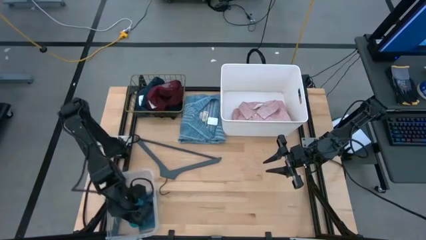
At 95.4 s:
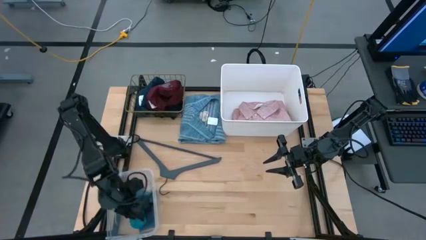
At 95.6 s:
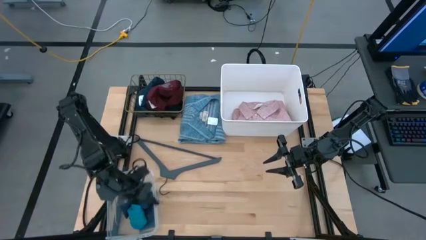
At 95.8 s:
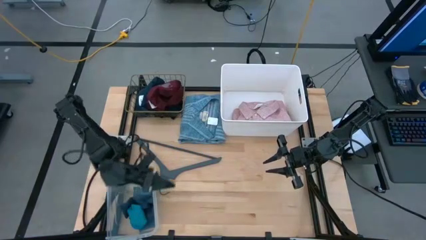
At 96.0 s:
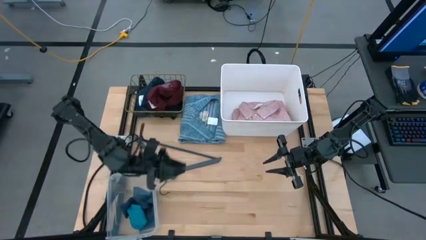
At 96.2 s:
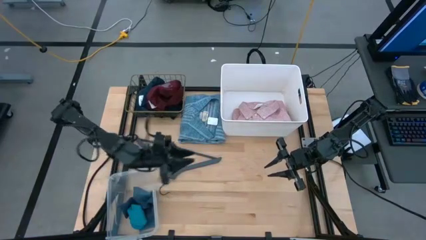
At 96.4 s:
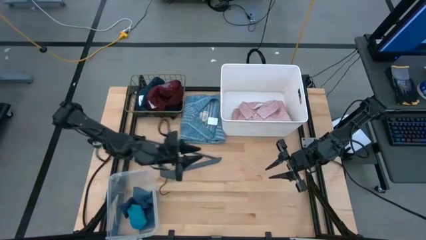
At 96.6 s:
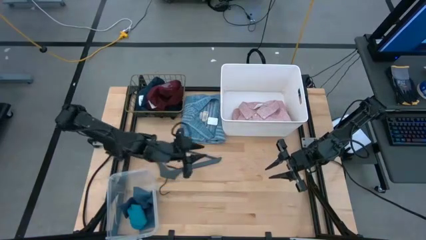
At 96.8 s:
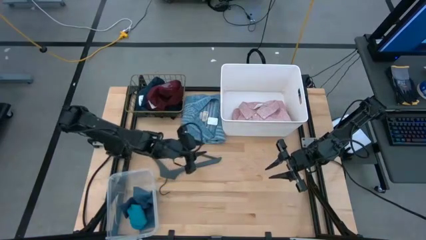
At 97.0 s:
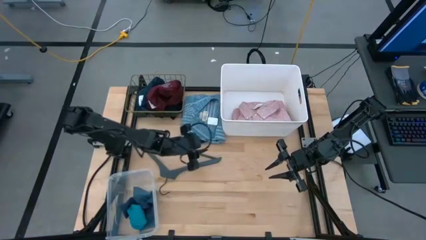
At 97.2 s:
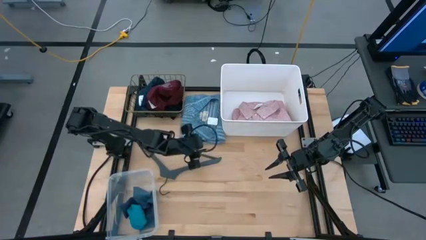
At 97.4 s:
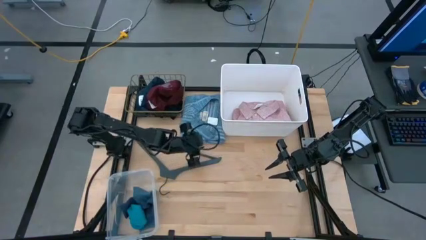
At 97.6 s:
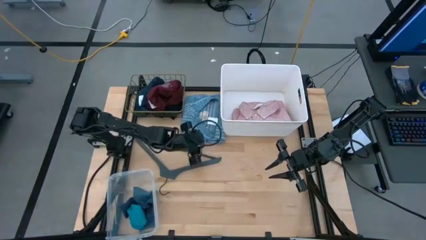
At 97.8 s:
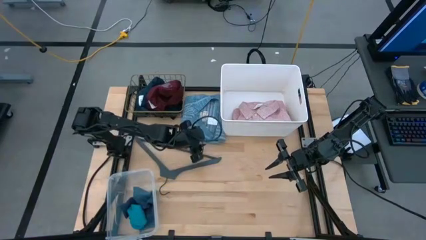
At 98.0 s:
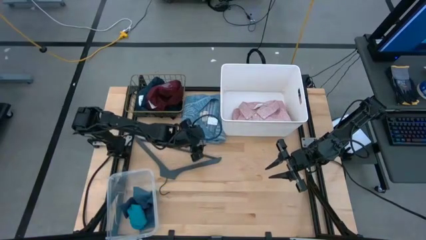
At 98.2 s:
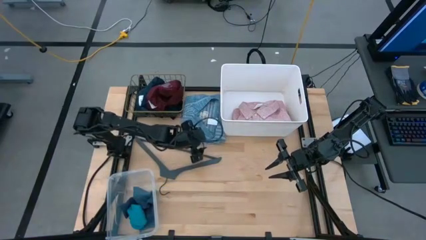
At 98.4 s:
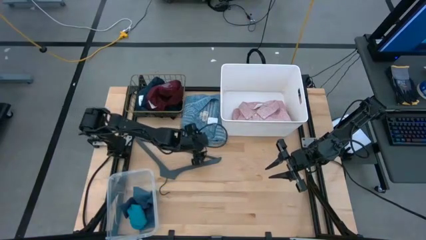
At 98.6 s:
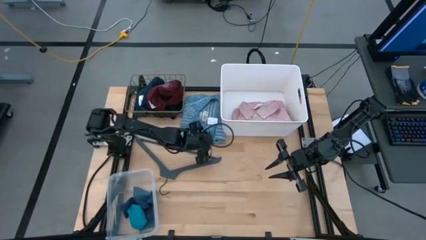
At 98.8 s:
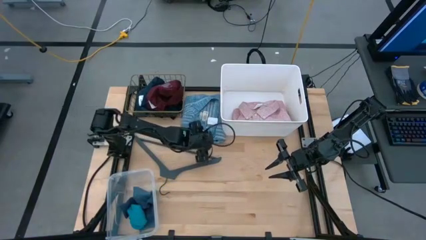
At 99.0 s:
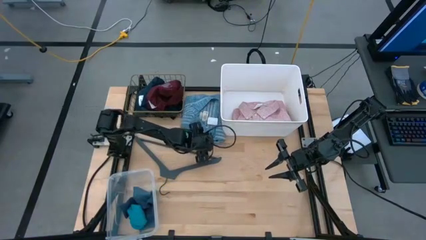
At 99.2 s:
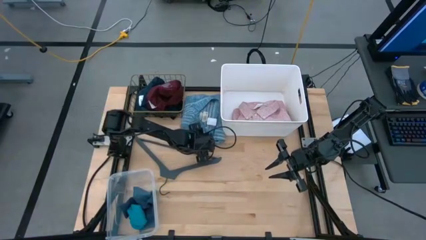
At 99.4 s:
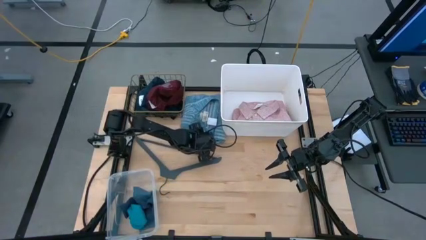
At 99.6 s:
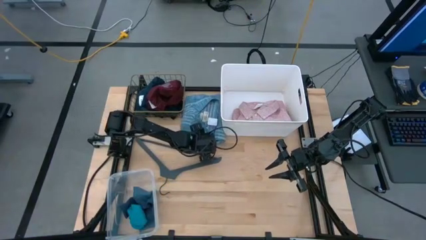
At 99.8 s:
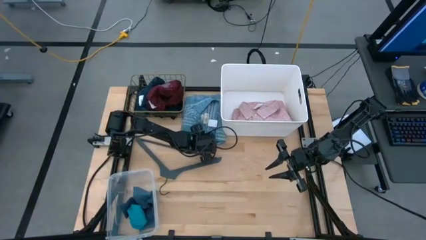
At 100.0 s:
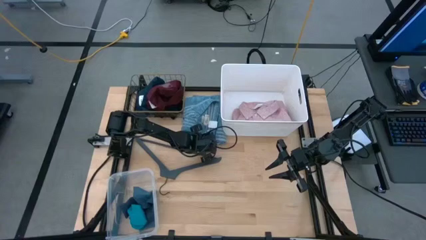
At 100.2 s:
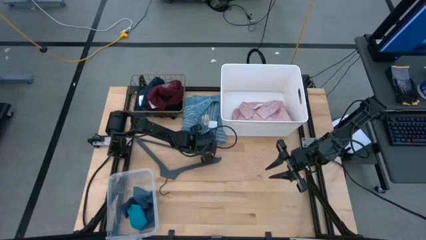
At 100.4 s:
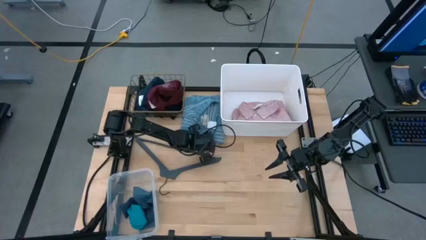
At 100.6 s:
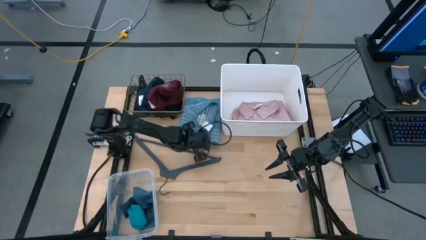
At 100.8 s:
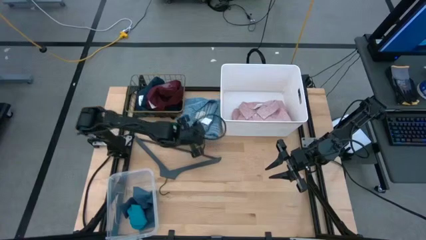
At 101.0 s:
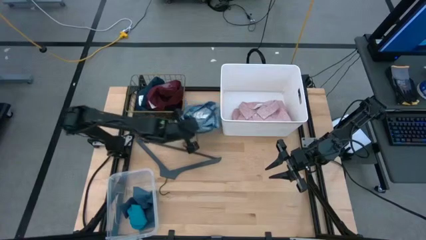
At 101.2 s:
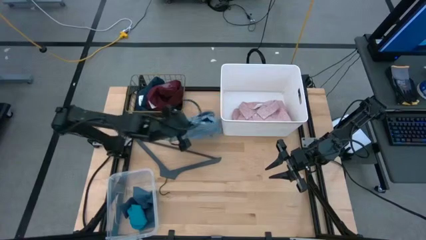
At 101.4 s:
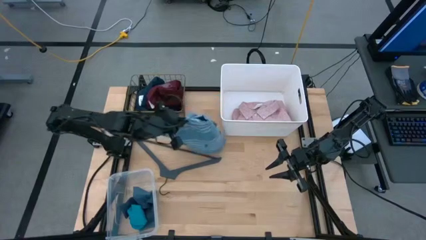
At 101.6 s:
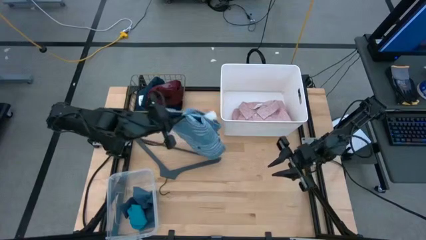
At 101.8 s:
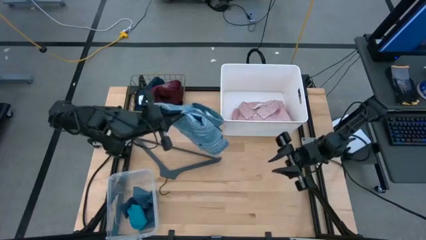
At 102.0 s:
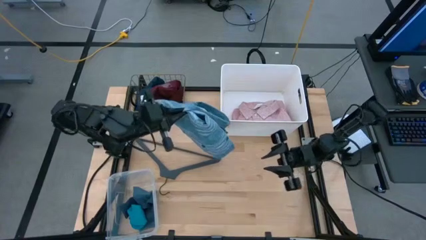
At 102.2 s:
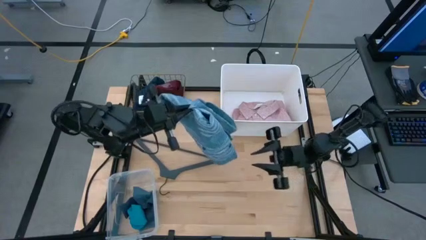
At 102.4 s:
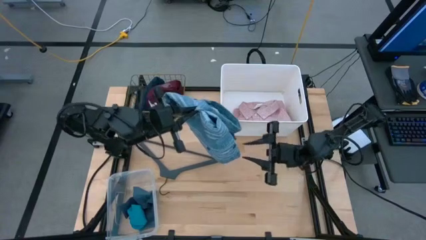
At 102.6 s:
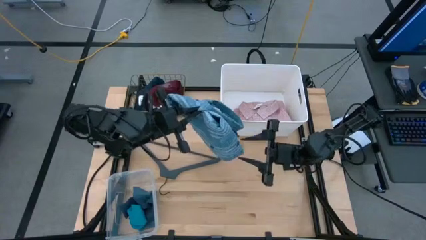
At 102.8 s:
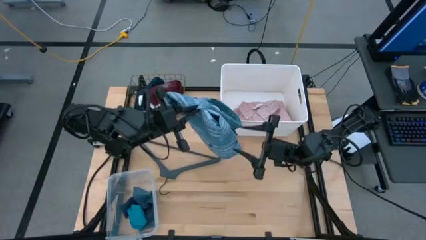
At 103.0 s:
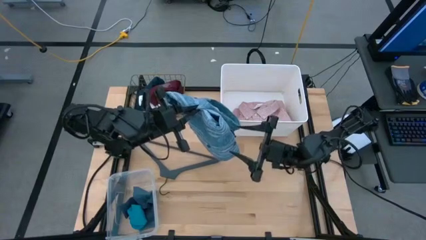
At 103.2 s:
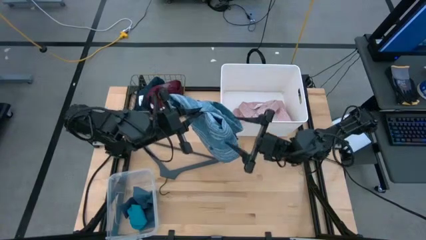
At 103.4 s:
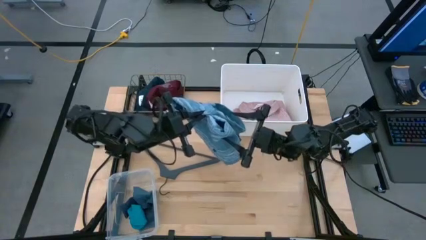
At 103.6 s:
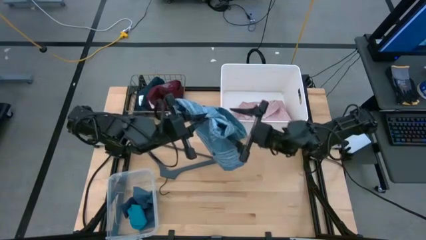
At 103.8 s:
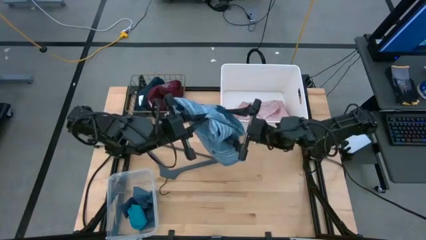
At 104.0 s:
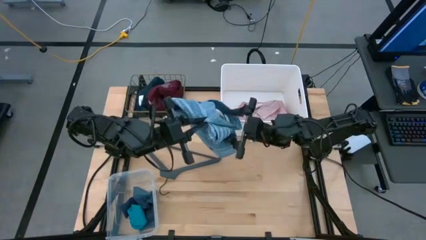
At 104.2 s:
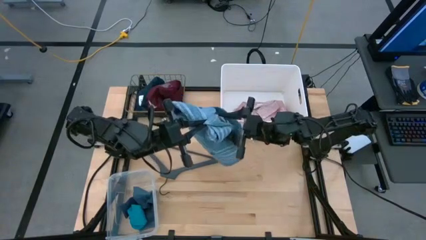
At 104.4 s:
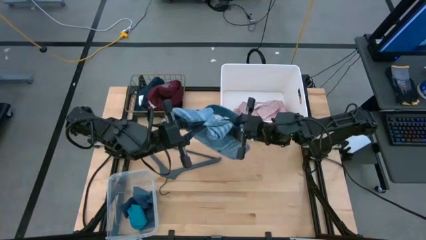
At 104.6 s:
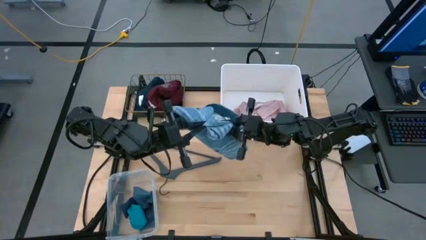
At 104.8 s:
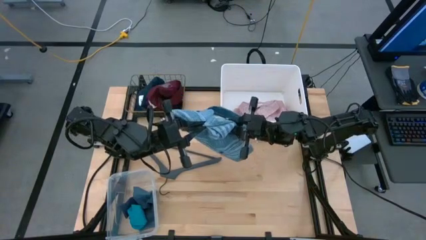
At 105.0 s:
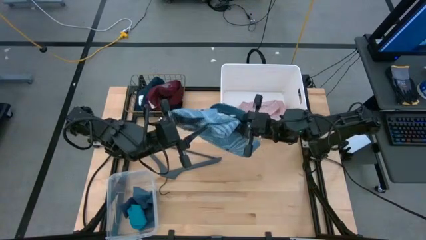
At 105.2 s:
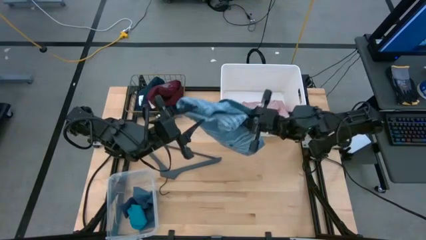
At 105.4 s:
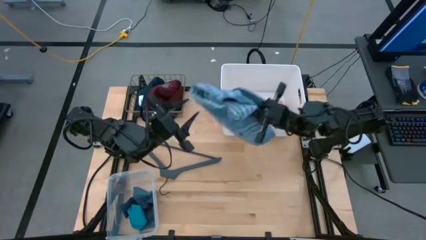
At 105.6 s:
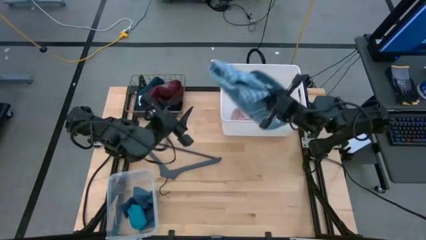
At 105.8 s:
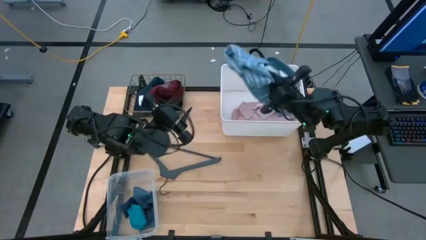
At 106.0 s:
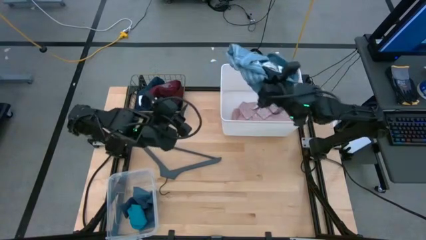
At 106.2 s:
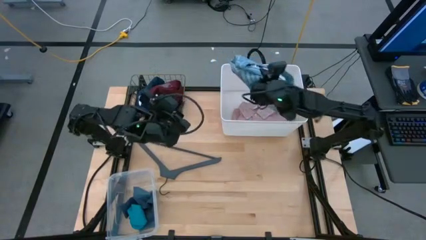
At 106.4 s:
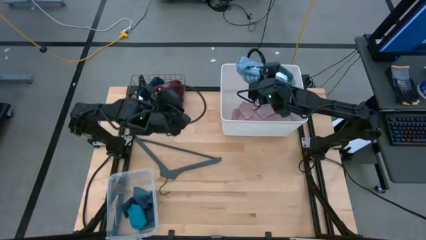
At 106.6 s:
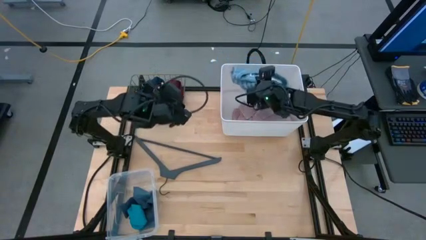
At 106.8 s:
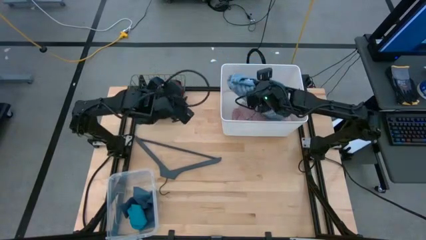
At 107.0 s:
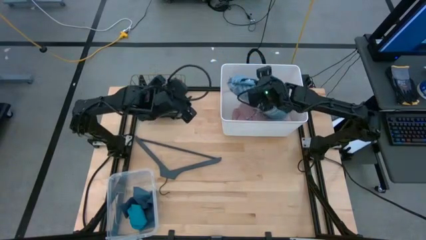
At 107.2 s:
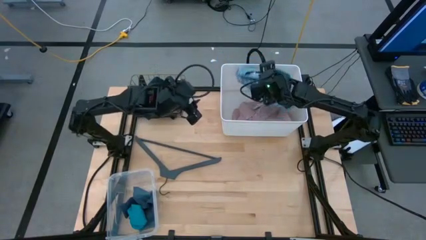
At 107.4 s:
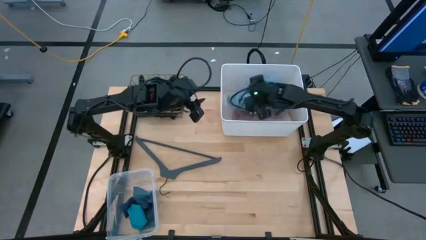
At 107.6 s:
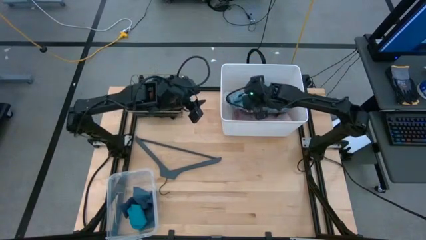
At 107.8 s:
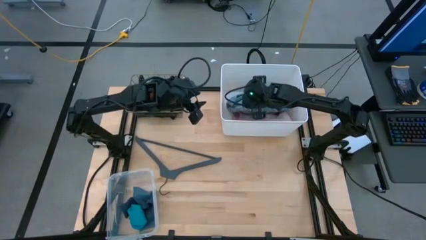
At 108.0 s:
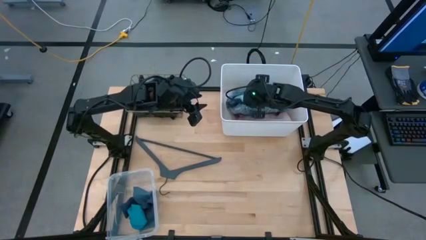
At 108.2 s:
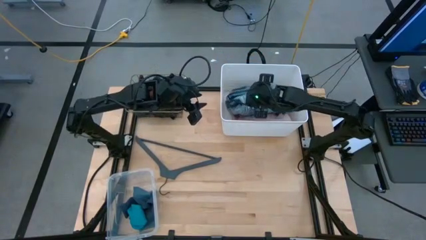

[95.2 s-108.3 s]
Task: Pick & Place Cloths
Put the blue shirt into the white bin
